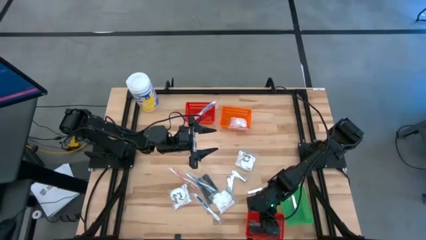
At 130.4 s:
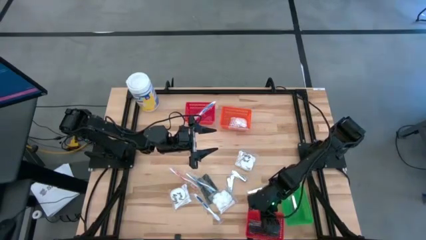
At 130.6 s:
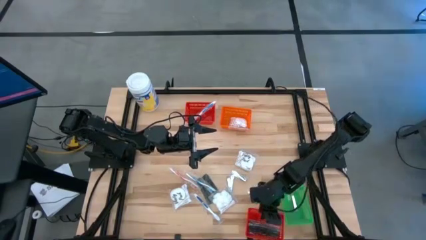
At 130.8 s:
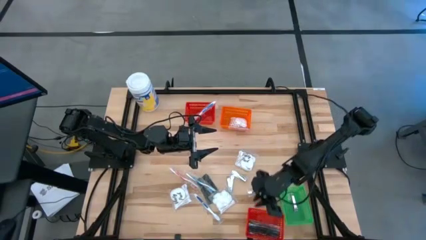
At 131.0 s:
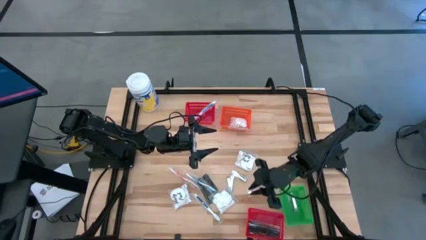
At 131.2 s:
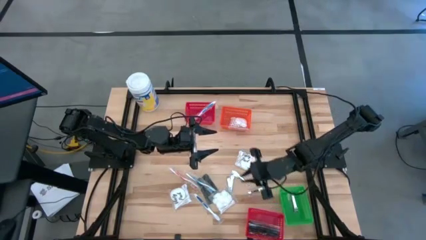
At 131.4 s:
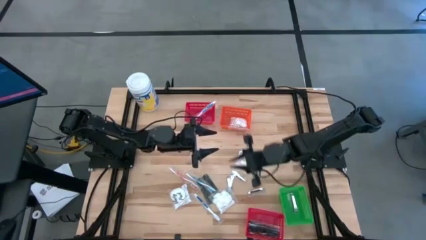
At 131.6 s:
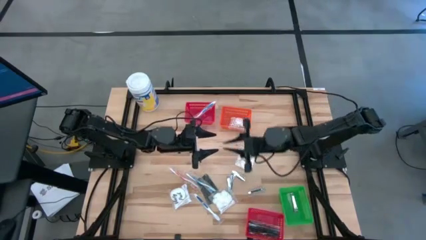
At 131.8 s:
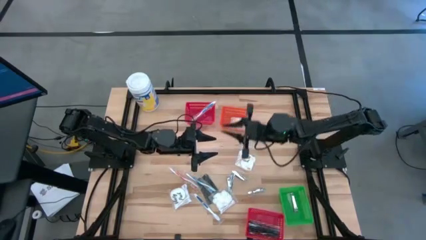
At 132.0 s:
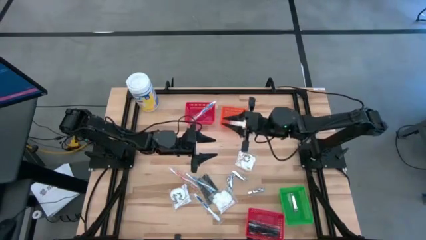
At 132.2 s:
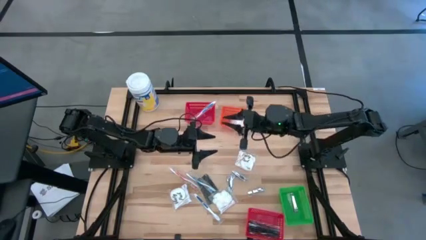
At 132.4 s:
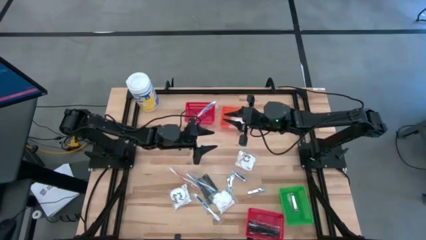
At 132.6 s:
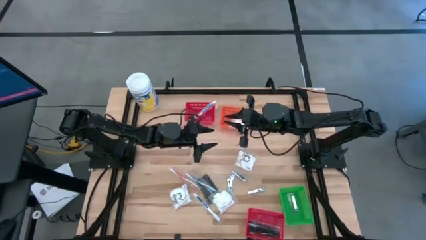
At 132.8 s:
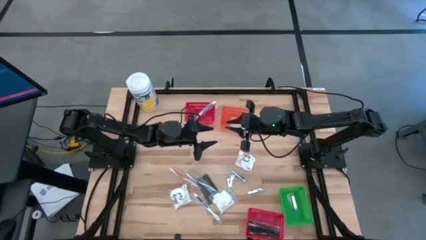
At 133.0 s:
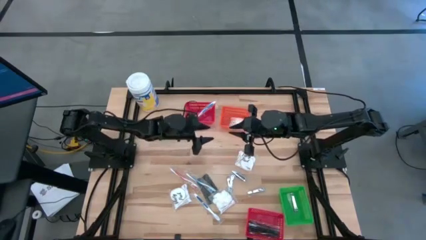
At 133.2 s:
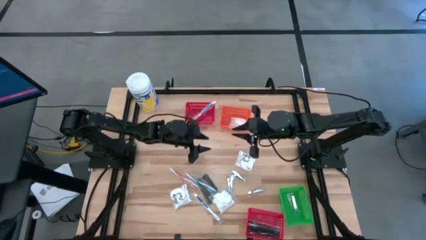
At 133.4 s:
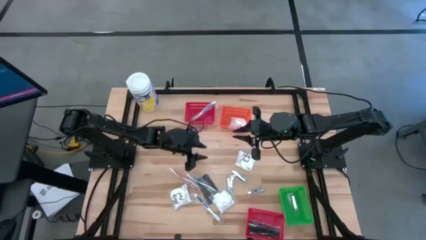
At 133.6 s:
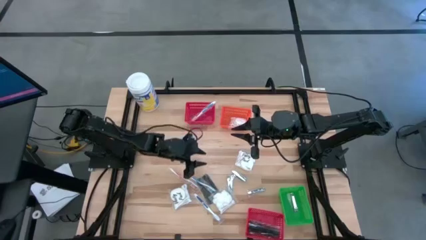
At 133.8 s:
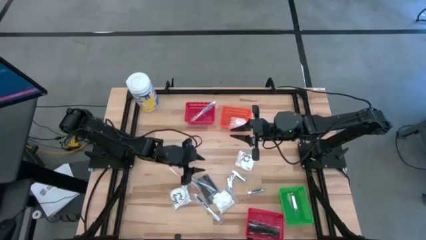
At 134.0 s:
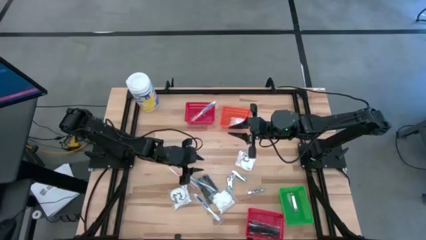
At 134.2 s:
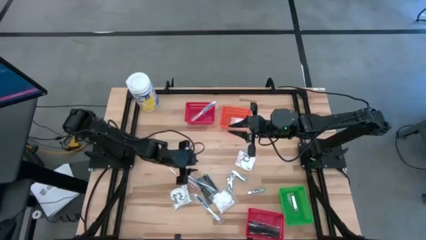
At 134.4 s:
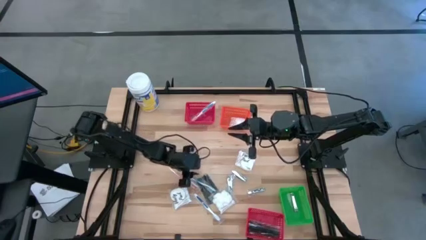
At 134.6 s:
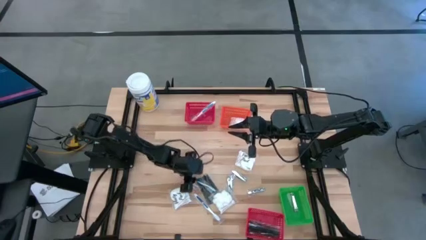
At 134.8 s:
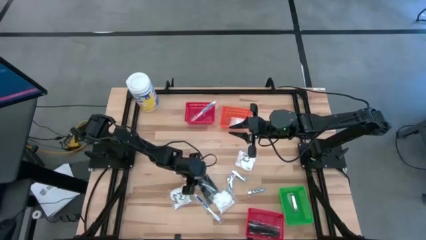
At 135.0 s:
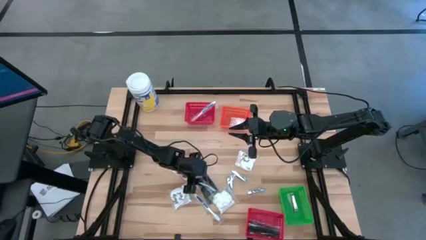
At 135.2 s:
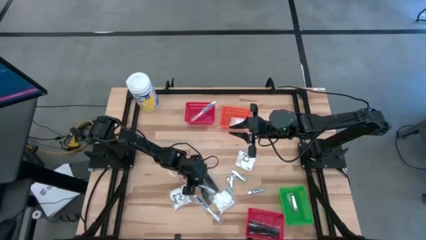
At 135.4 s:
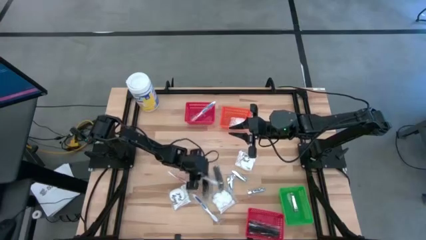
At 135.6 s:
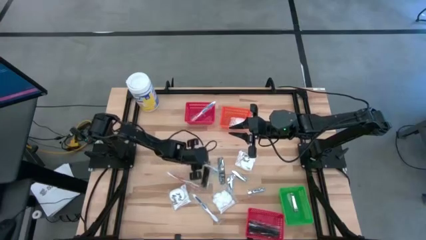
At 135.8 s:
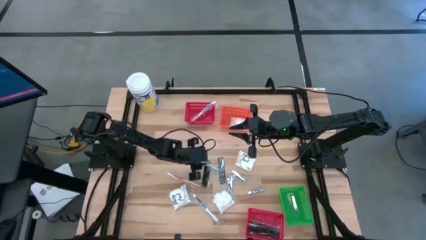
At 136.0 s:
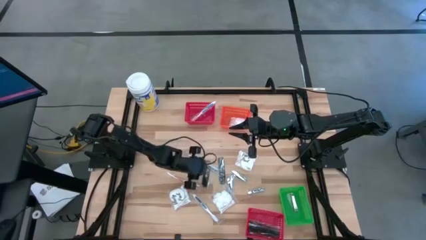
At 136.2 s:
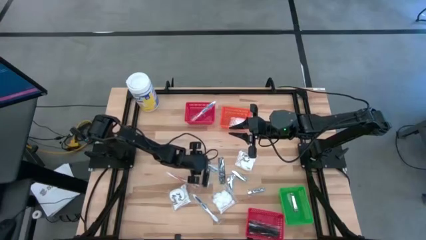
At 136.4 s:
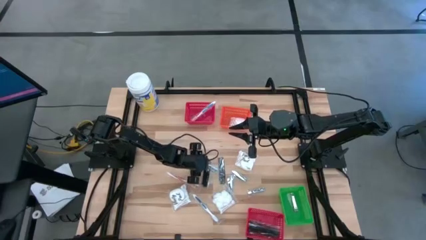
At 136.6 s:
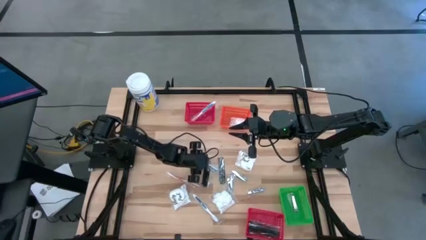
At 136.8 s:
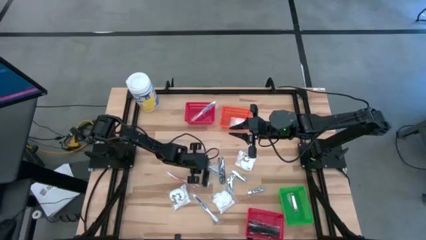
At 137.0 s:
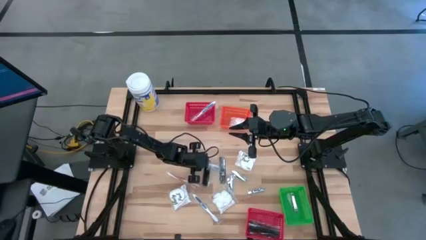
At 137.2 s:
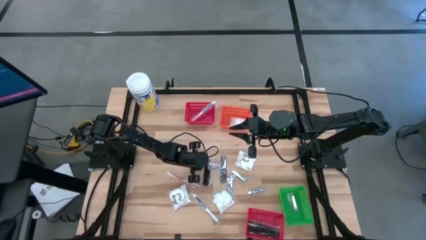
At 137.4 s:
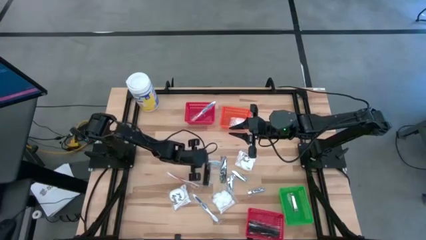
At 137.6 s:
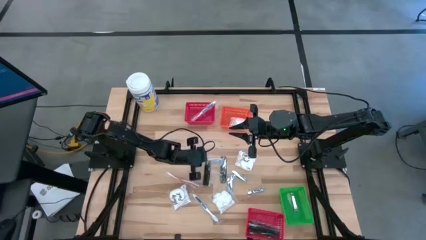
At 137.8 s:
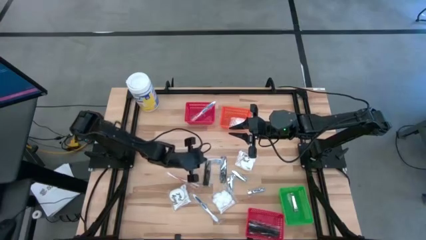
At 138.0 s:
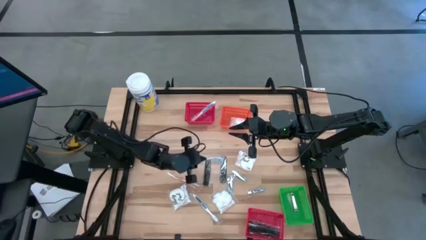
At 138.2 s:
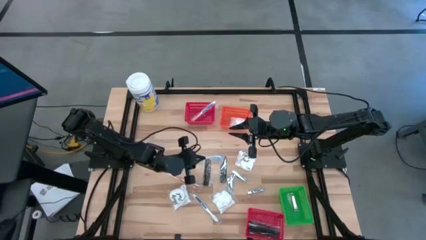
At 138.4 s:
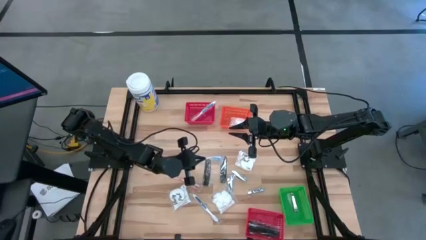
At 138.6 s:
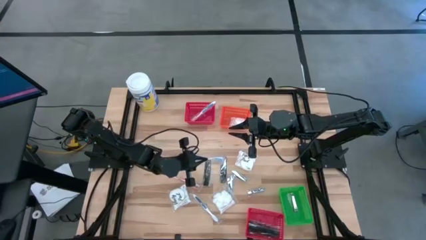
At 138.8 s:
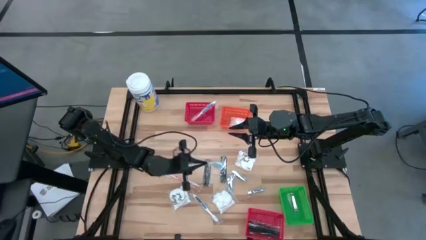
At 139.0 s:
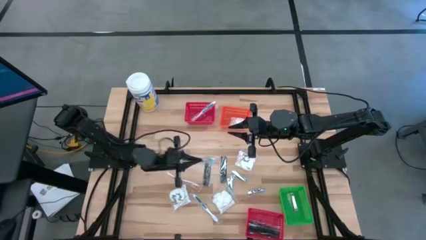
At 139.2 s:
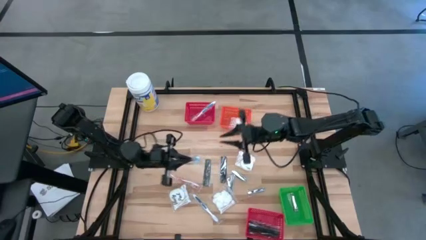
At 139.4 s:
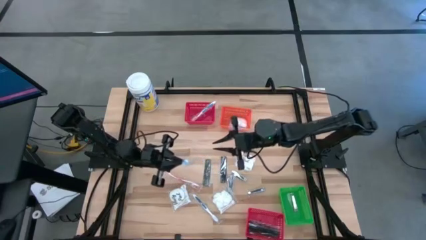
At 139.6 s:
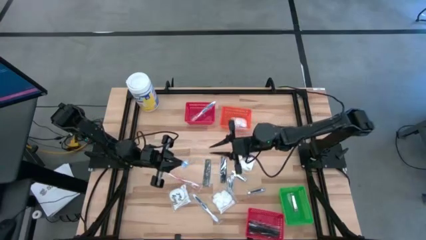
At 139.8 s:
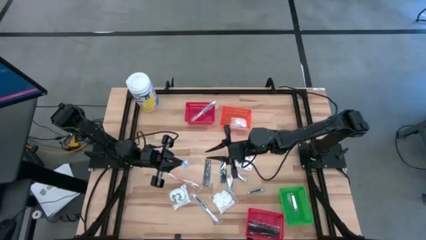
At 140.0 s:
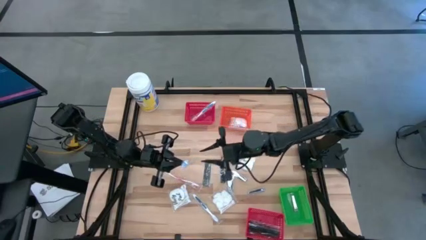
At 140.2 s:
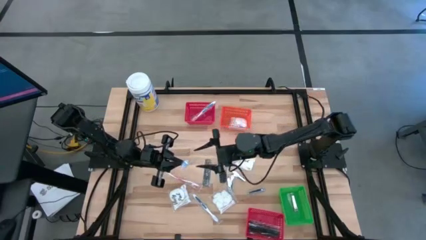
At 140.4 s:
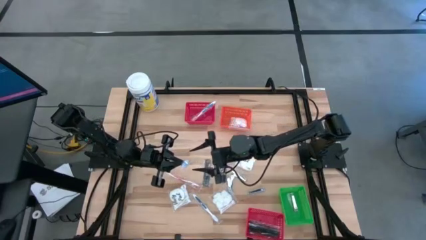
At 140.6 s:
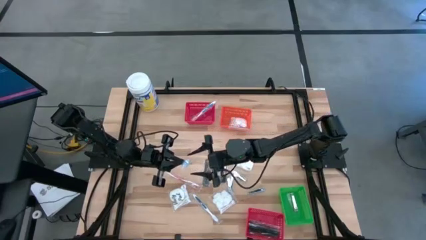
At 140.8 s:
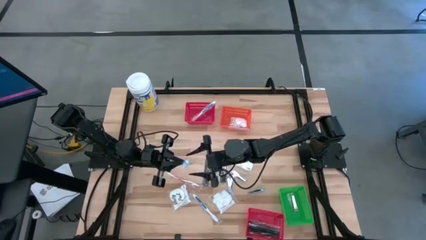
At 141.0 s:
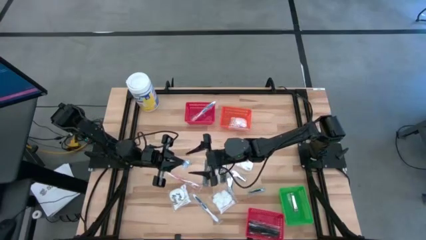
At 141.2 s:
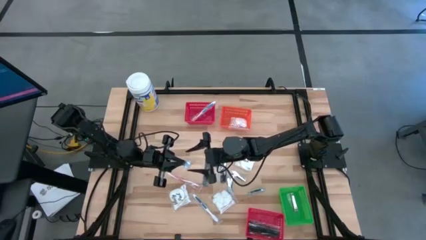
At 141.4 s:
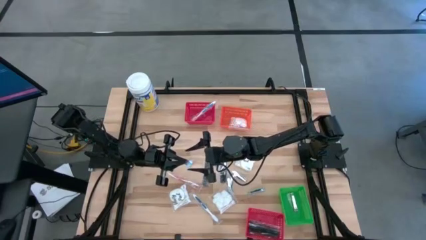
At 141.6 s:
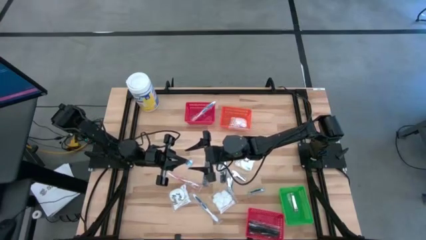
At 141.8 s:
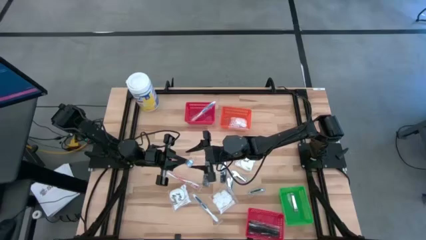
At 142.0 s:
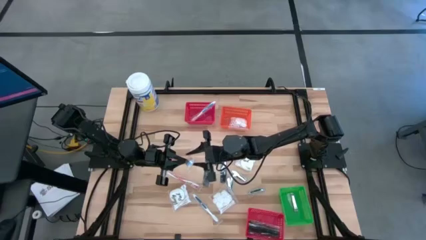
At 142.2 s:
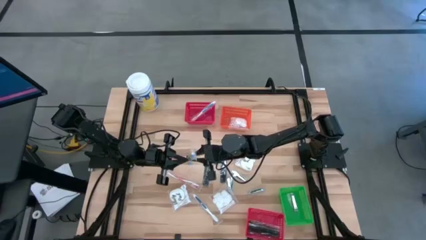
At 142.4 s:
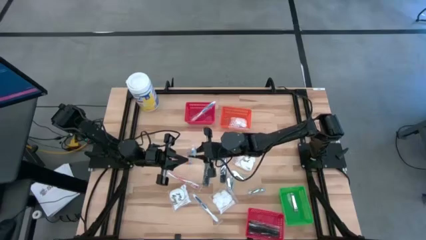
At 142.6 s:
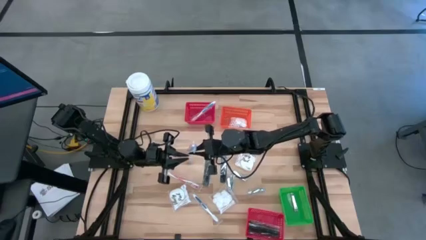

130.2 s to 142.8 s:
Task: Pick & Place Travel size toiletries
Put the blue toothbrush into the top red bin

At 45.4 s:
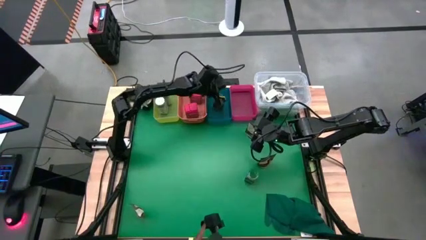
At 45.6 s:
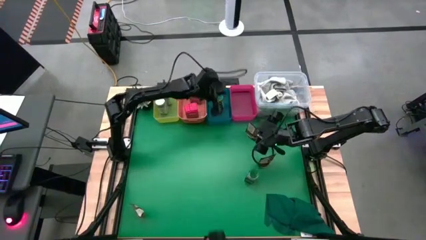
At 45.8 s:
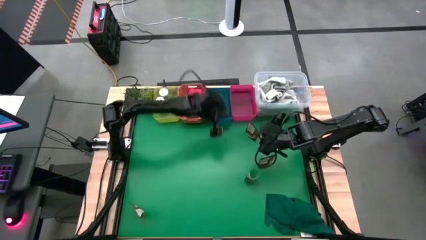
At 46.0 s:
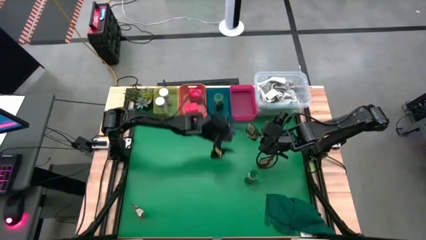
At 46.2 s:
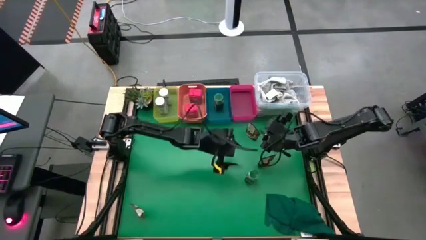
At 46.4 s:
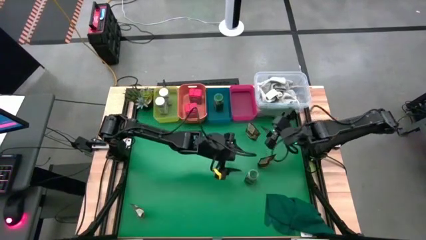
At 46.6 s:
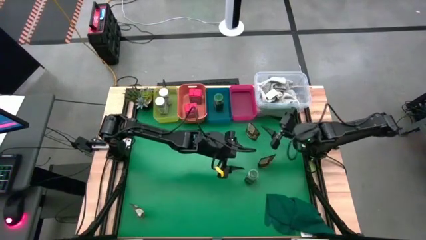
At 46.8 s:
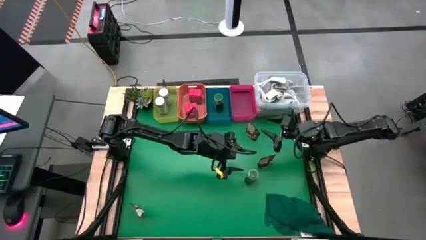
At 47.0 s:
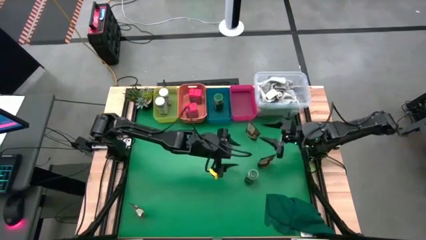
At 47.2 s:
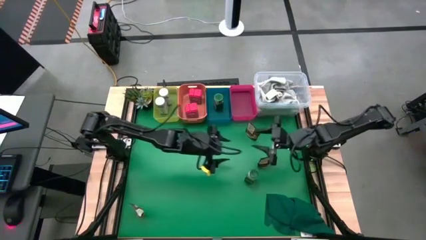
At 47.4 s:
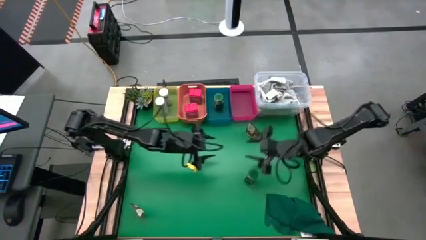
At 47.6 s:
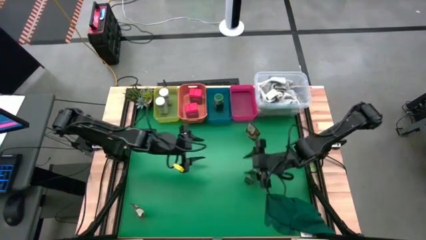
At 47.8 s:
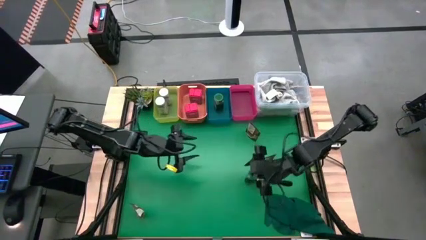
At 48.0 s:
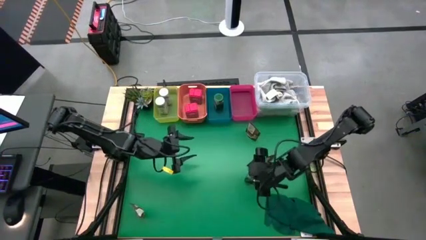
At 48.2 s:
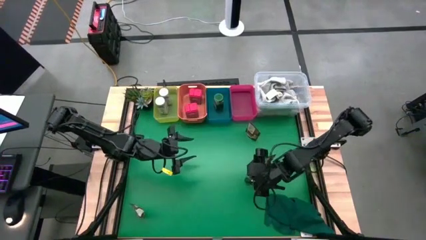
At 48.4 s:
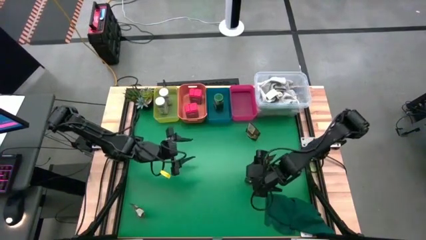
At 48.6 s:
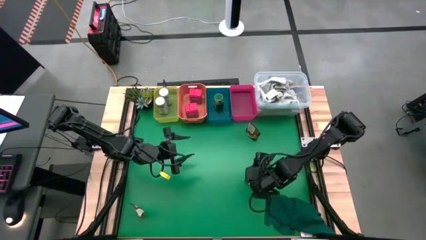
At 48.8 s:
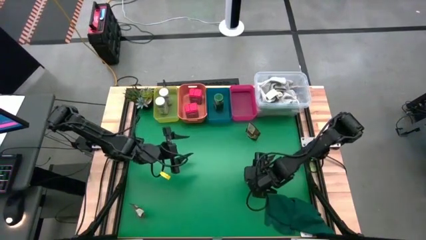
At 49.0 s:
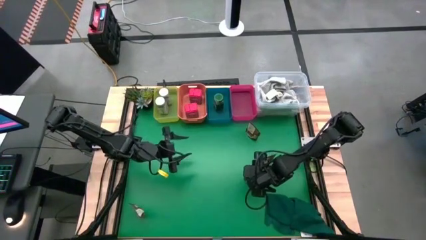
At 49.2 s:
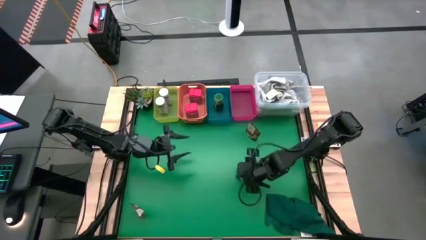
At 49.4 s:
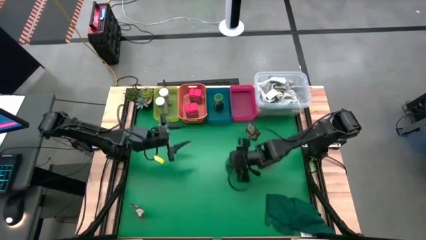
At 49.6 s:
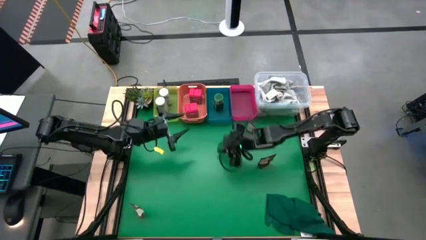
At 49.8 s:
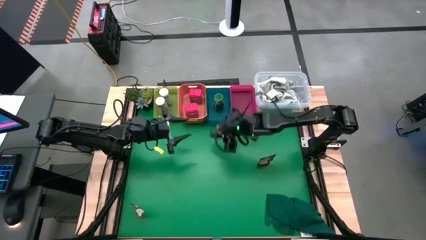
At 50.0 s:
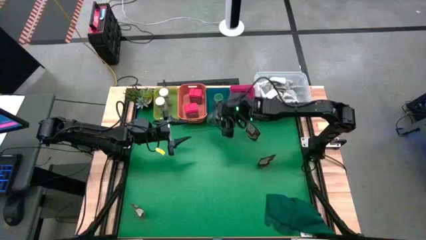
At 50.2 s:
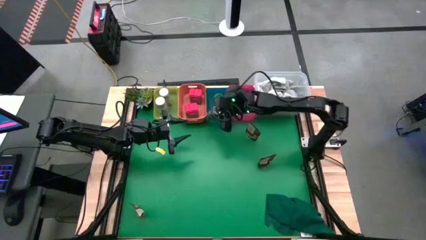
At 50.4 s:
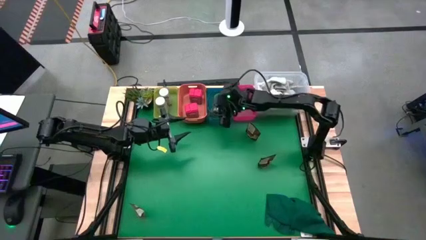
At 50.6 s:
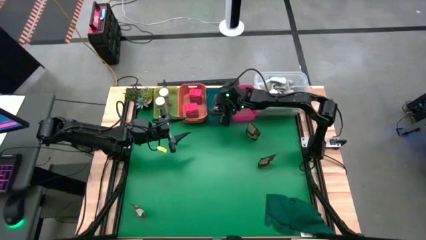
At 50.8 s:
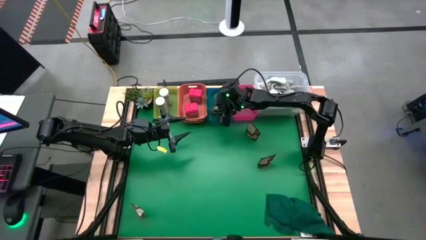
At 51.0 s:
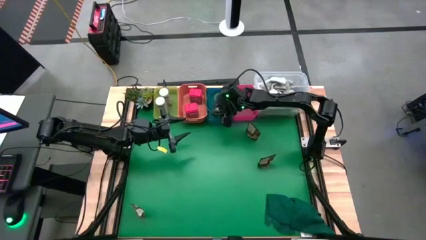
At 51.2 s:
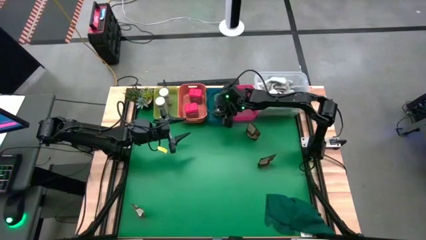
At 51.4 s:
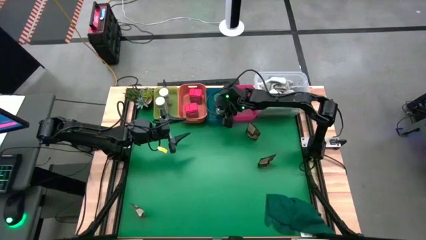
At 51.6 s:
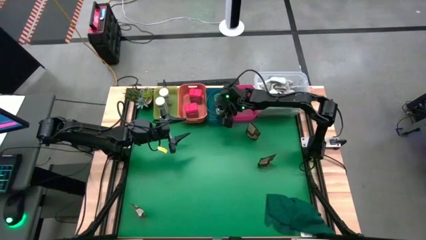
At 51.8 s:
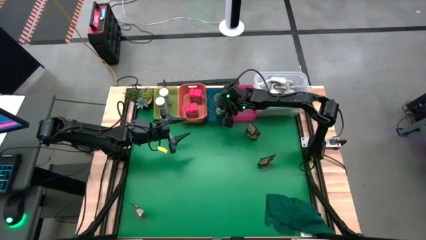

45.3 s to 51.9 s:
Task: Sort spices by type
Put the green seasoning bottle into the blue bin
